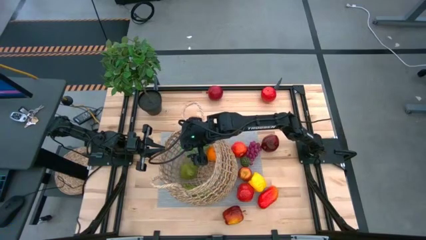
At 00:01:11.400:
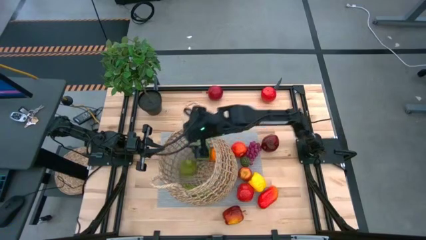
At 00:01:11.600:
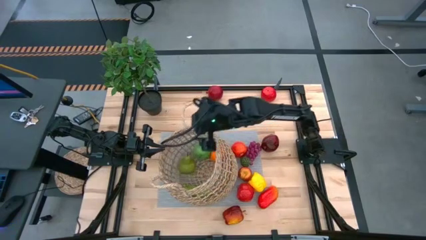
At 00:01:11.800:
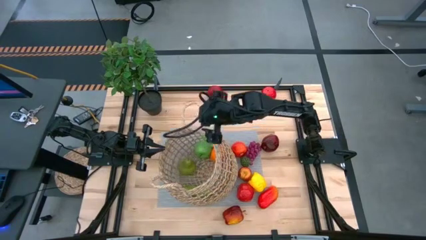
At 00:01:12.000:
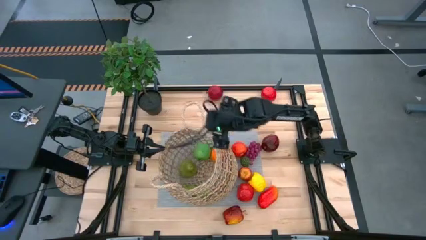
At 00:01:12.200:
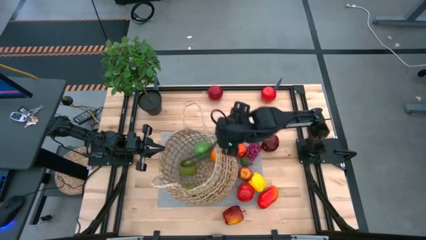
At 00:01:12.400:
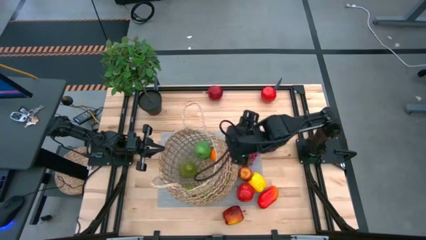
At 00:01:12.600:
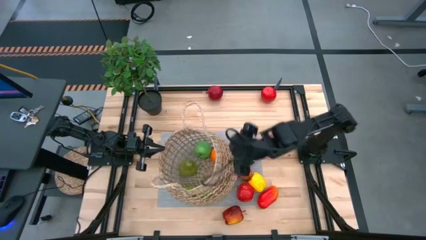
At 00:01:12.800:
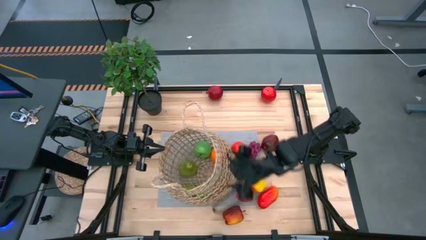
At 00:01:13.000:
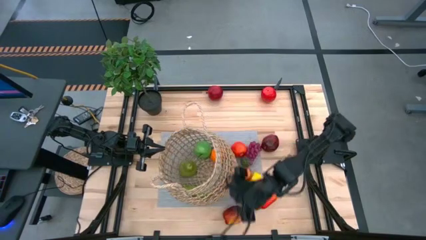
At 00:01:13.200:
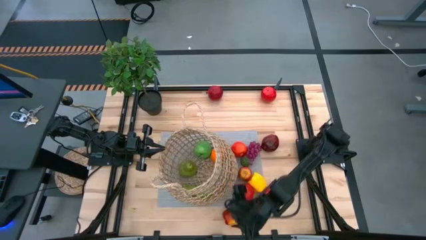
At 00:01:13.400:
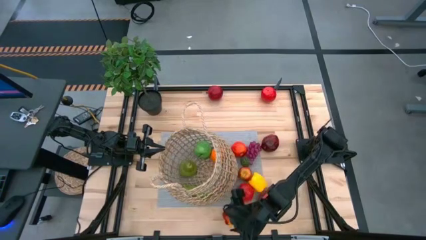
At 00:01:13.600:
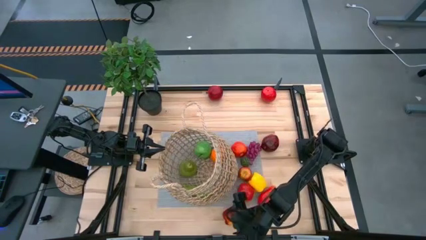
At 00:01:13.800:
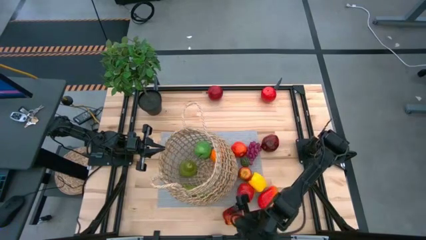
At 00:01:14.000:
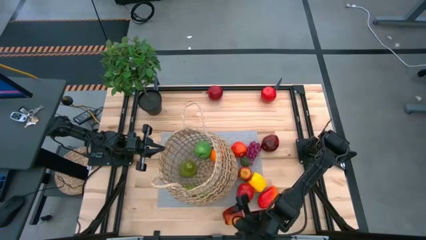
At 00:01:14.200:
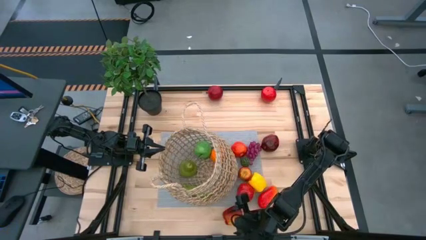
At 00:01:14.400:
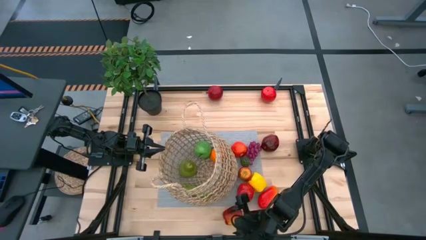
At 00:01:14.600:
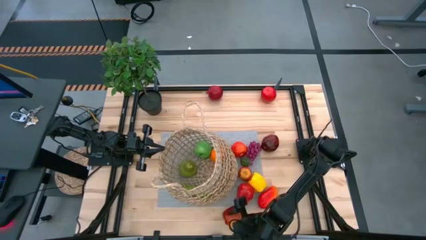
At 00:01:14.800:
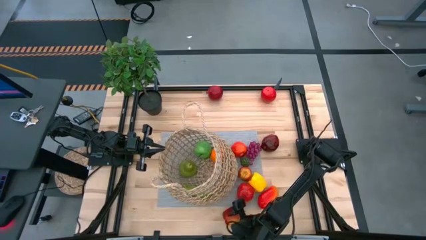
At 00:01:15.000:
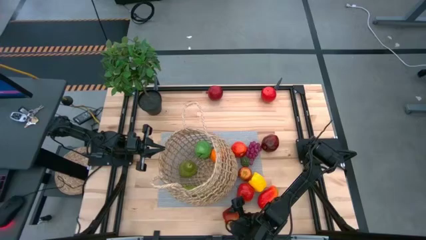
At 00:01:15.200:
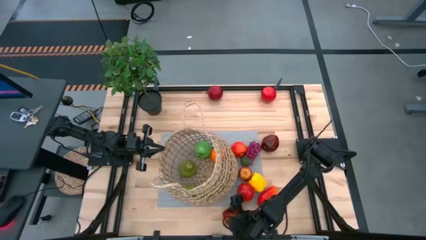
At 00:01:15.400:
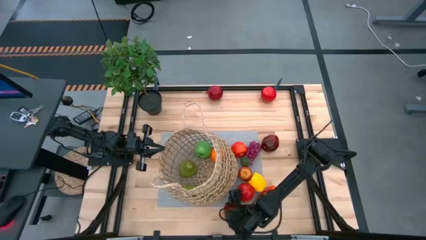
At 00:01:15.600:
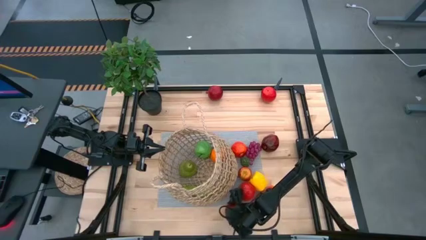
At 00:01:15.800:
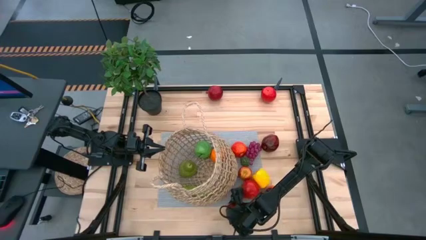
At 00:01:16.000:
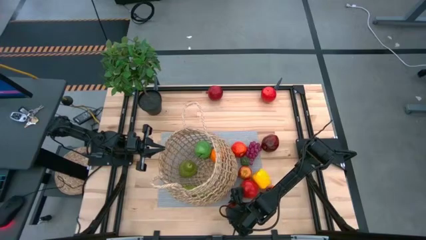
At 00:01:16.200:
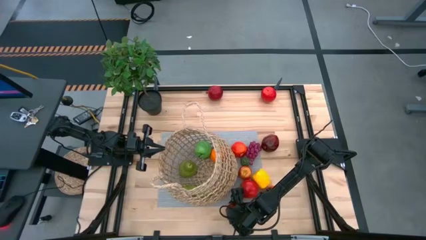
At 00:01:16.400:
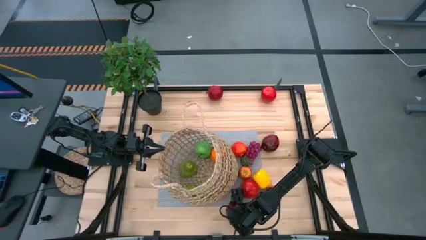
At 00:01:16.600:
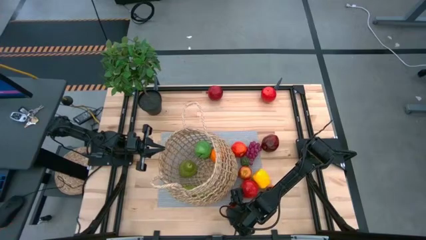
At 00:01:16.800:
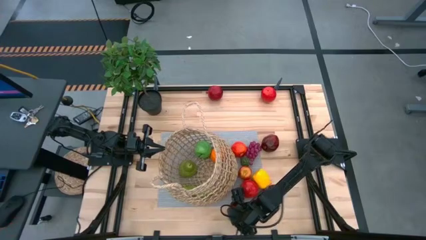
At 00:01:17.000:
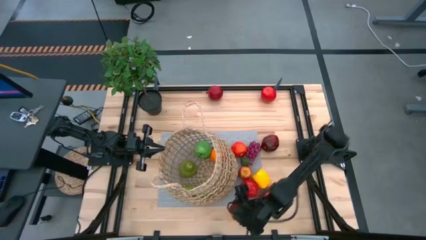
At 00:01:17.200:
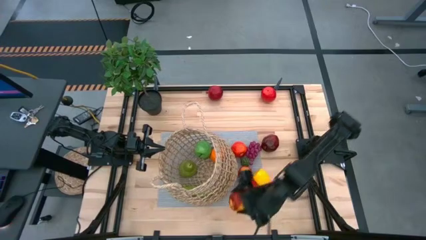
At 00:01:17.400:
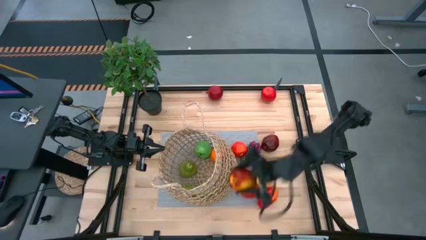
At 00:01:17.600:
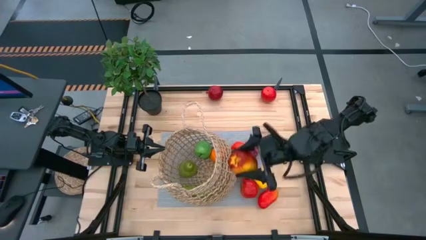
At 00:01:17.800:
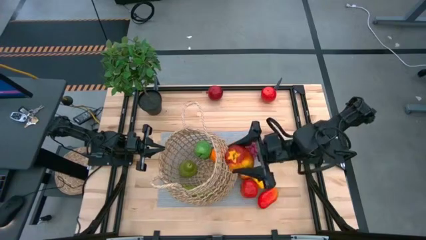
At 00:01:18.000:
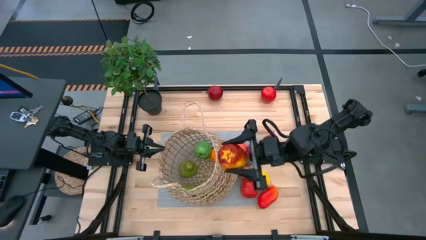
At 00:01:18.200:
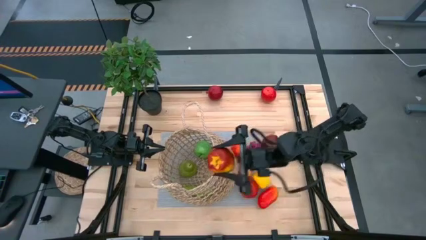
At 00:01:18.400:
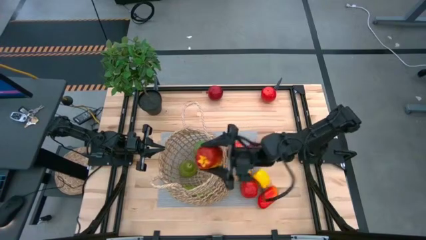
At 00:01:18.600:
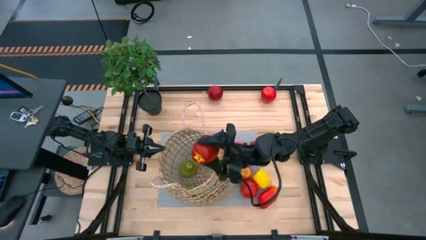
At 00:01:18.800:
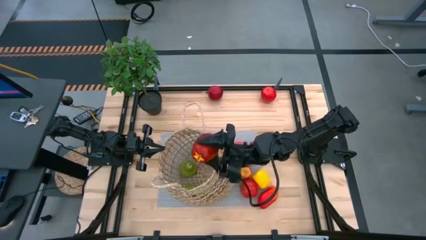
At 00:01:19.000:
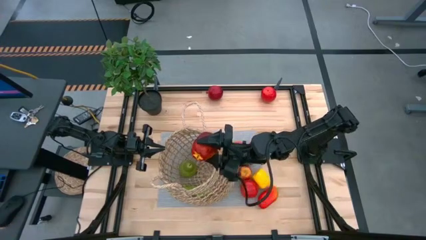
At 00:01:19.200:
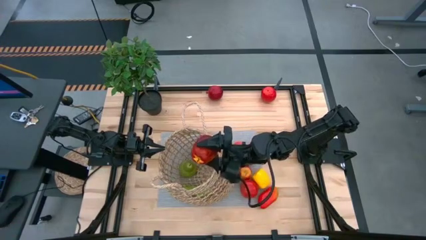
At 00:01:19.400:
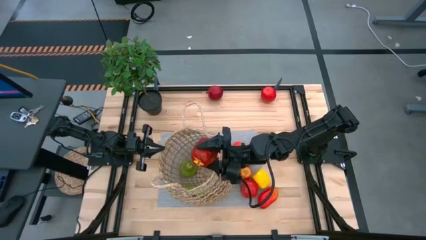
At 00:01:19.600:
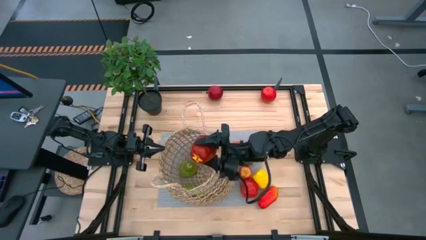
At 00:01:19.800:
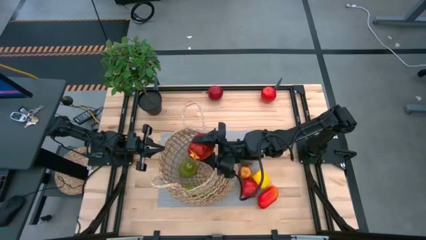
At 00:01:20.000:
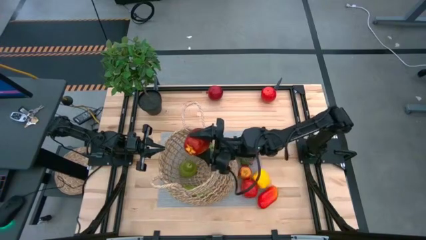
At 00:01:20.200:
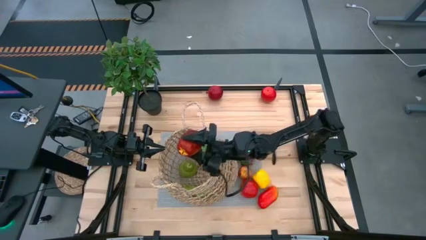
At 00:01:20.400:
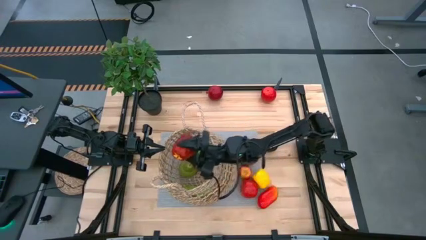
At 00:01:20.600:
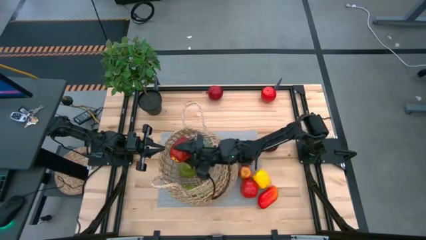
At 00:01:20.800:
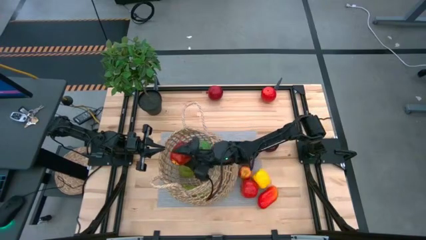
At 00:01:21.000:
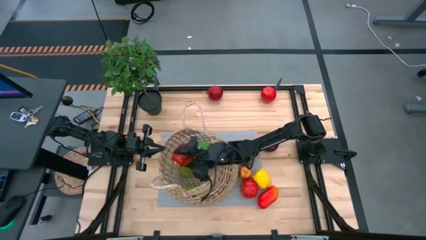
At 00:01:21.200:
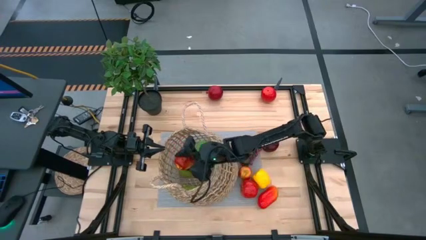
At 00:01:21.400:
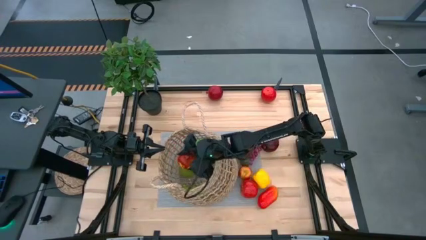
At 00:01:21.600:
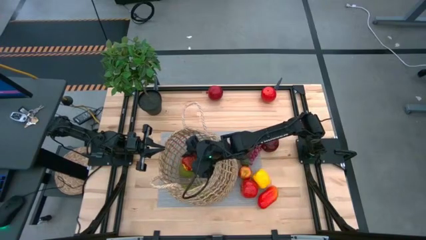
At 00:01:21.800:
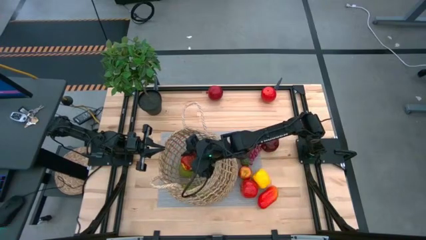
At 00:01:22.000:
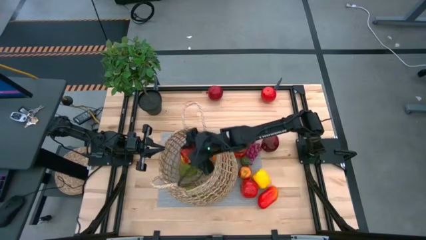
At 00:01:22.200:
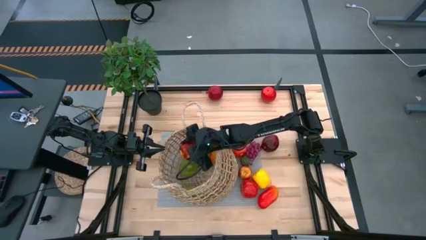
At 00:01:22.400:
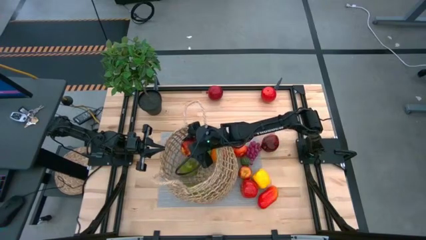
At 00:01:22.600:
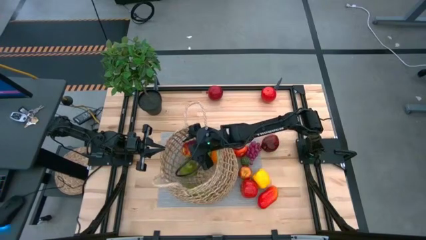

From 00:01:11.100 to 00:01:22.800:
Task: Build produce basket
Put the red apple into the brown basket

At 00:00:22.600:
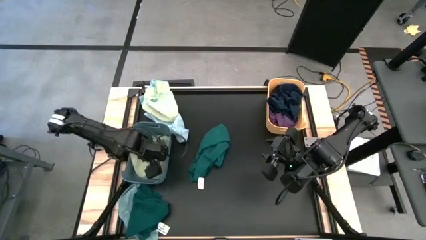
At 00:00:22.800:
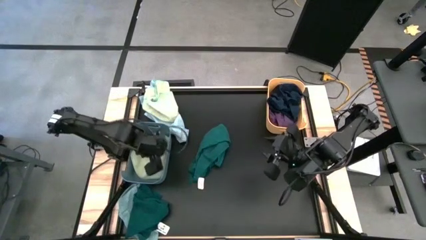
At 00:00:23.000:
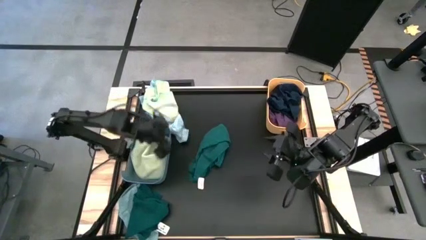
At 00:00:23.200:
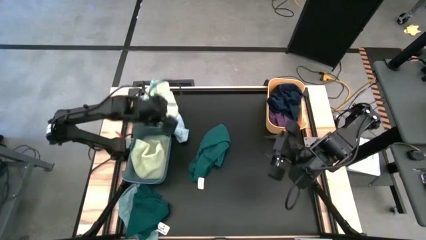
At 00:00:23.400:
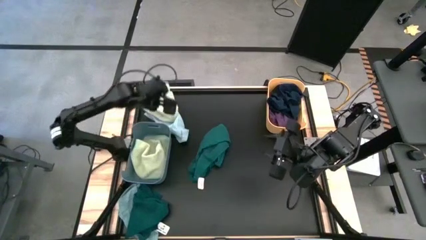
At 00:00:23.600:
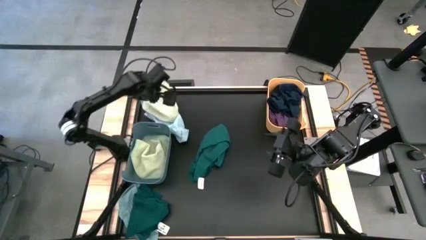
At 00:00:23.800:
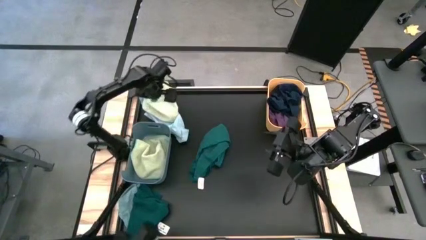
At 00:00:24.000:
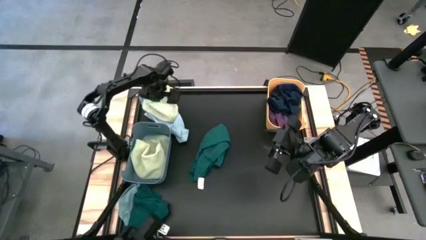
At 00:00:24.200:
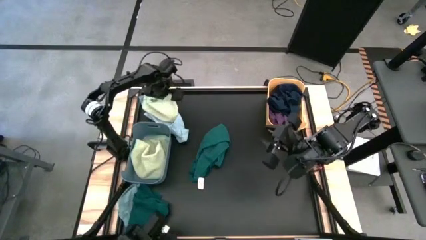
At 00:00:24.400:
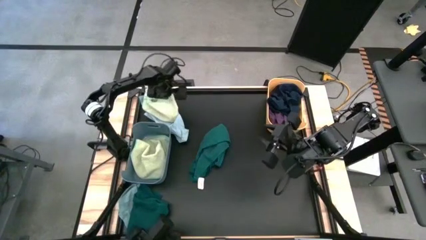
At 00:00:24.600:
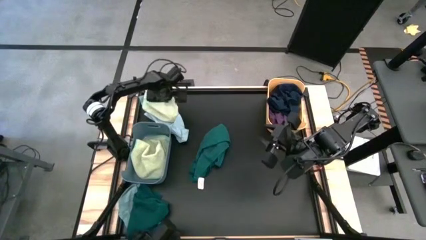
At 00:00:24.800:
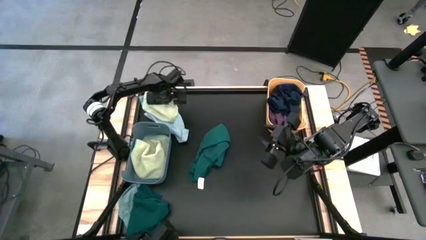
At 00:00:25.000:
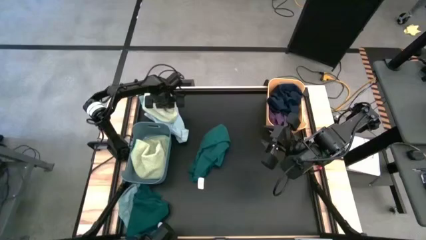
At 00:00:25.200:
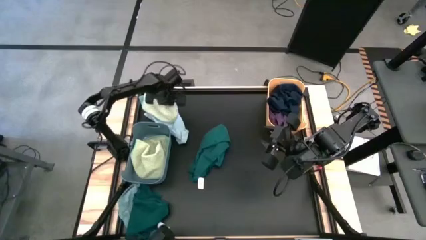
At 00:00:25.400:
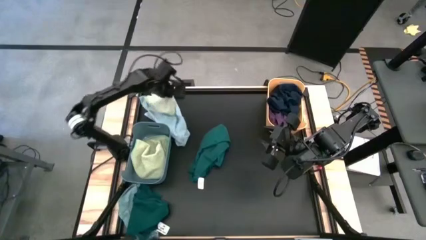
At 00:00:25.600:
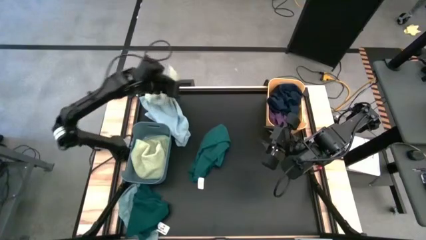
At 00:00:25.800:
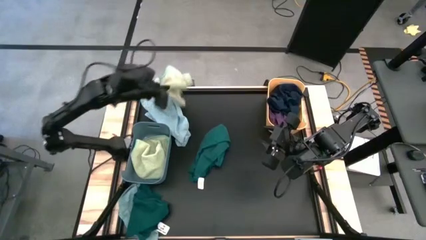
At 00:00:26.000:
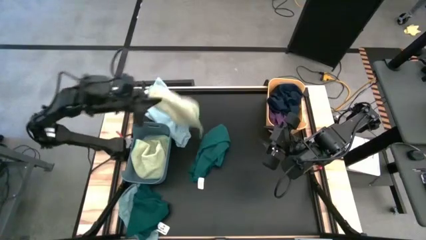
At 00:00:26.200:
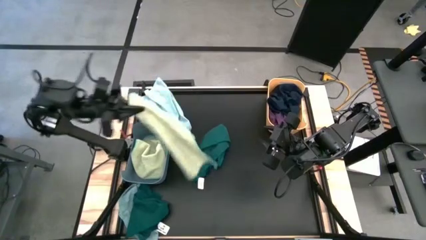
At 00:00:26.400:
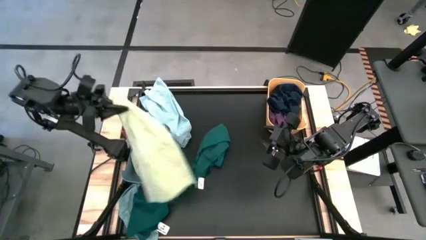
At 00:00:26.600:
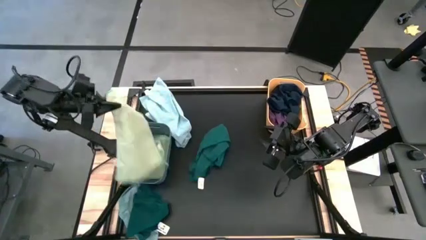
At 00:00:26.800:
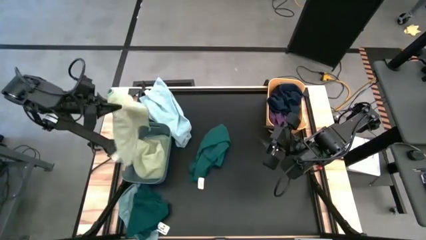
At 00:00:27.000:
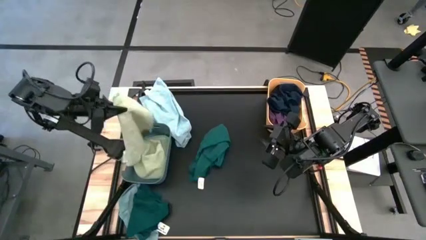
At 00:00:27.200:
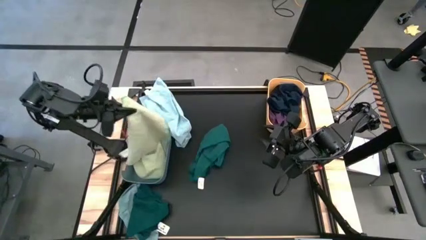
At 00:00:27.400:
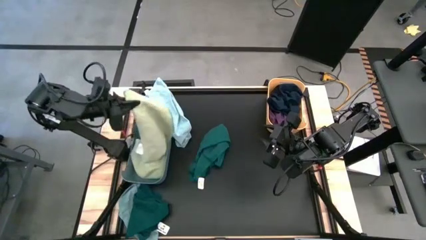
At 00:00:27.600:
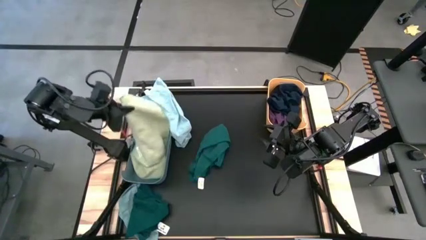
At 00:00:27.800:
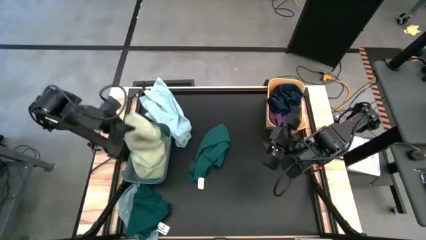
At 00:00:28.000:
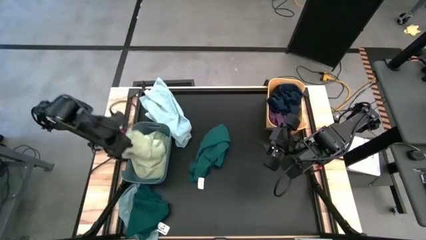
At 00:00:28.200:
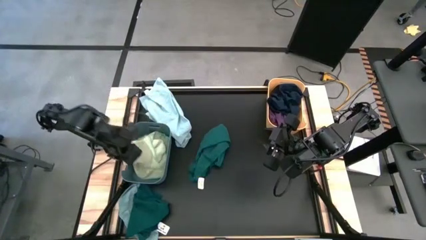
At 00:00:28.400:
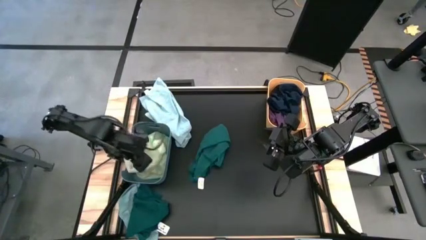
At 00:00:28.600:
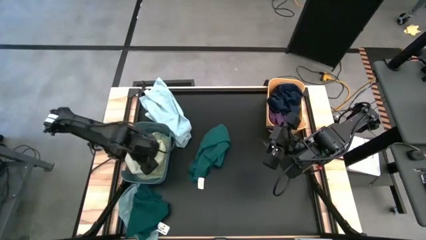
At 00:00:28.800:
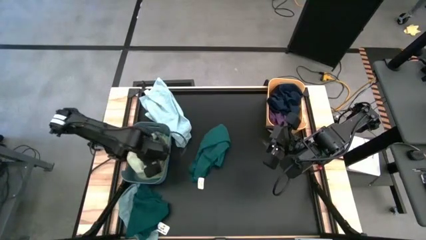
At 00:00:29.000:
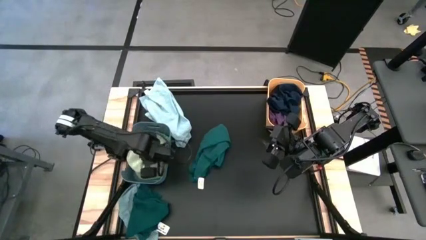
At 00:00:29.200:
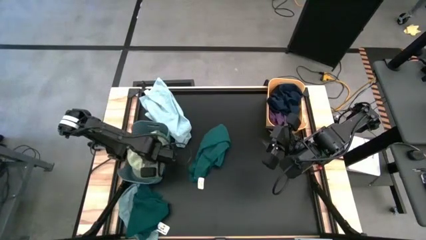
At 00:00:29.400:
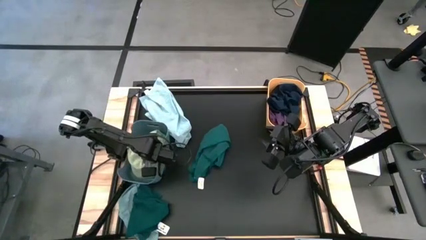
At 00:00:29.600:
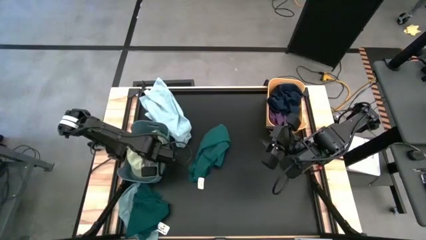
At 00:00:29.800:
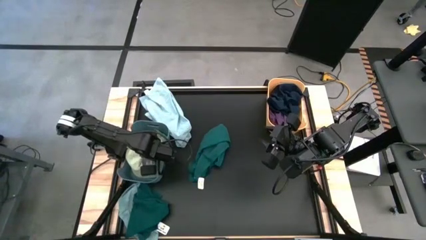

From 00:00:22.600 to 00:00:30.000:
Task: Sort towels by color in basket
Put the light yellow towel into the blue bin
